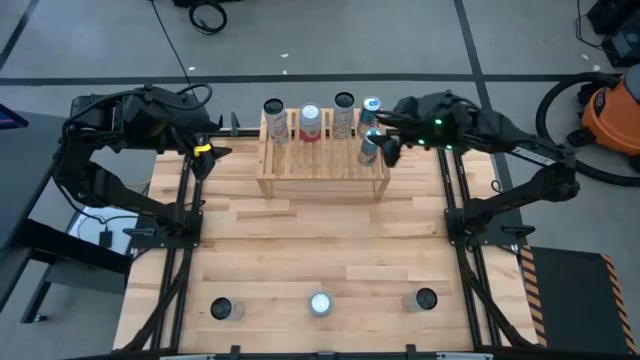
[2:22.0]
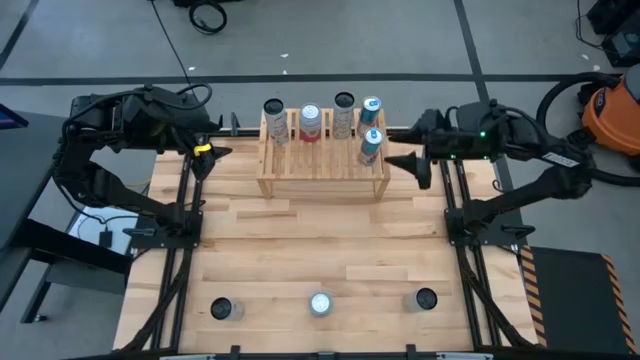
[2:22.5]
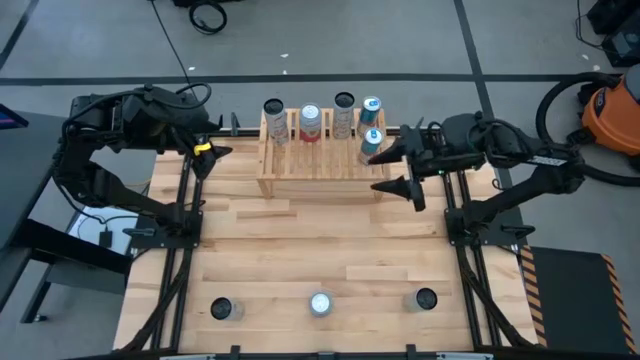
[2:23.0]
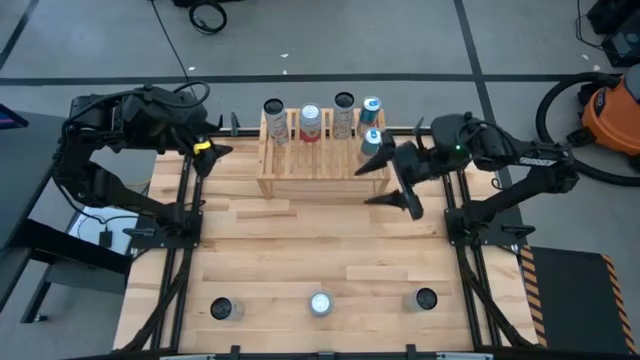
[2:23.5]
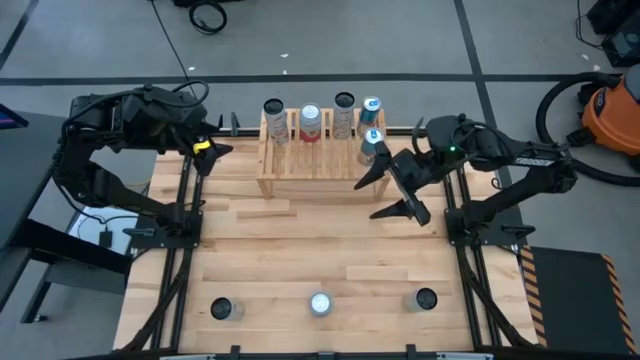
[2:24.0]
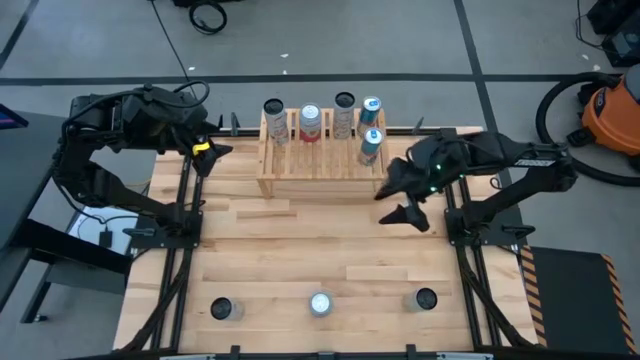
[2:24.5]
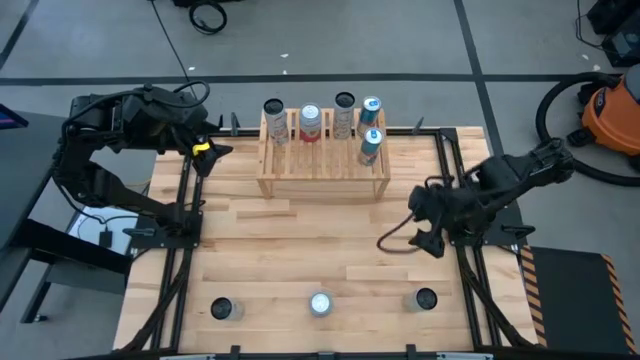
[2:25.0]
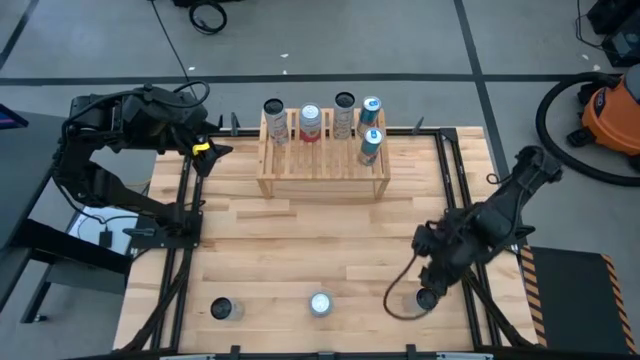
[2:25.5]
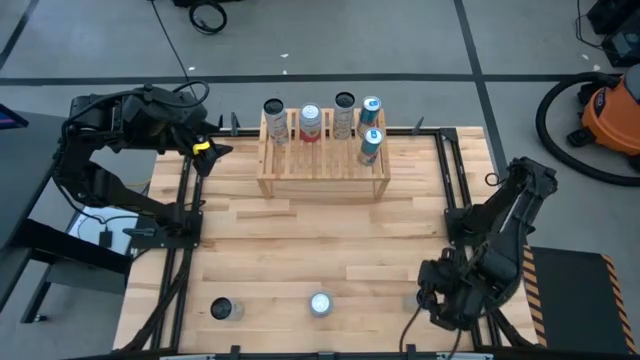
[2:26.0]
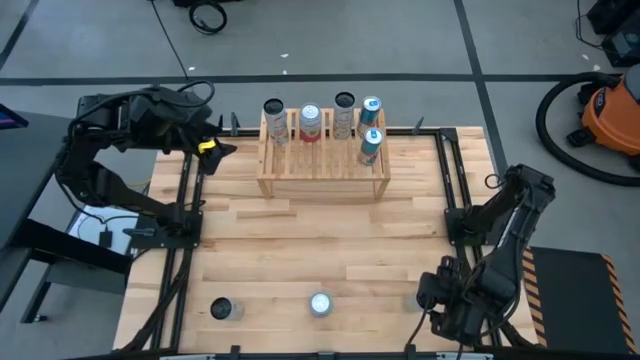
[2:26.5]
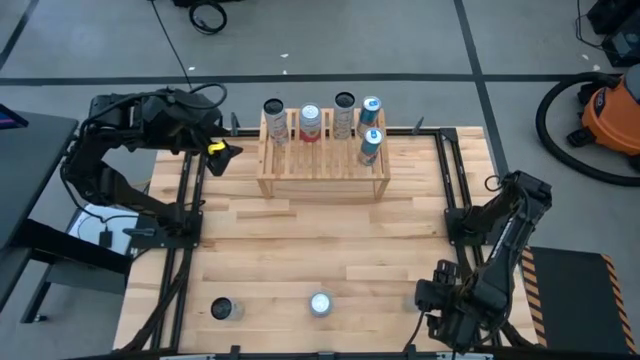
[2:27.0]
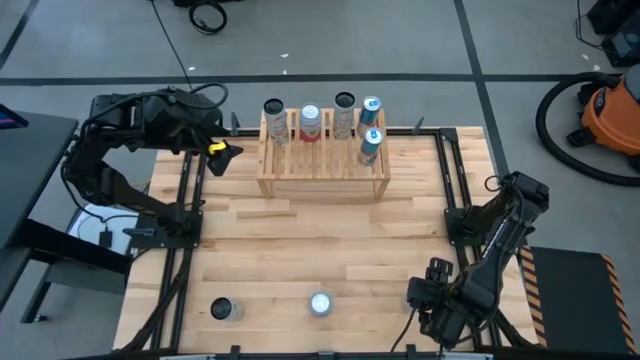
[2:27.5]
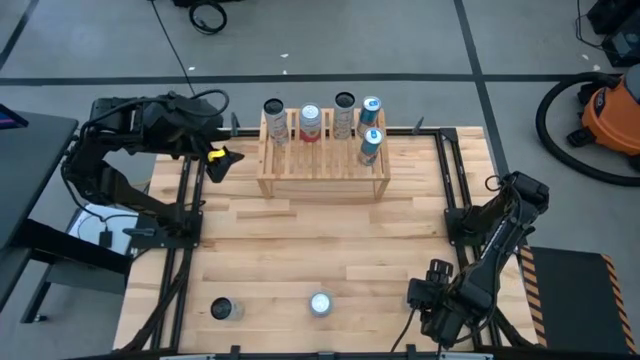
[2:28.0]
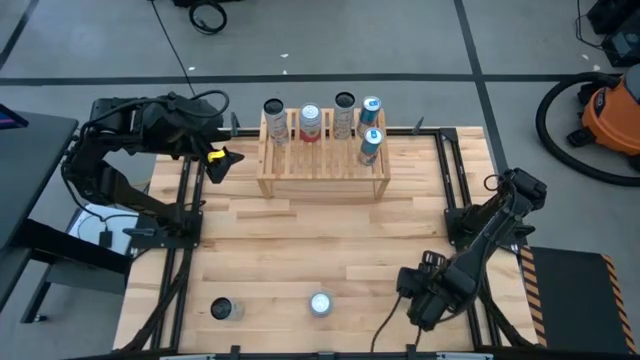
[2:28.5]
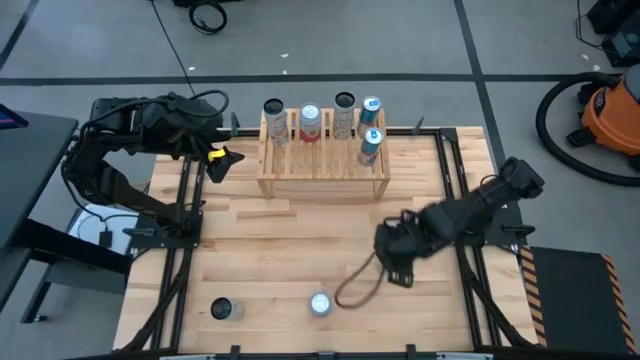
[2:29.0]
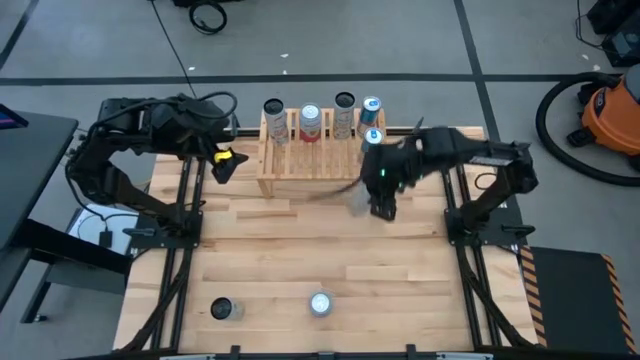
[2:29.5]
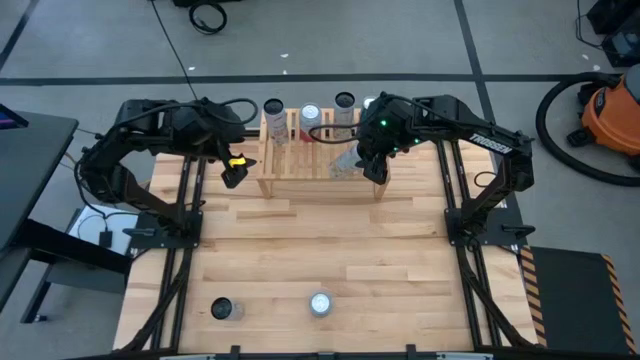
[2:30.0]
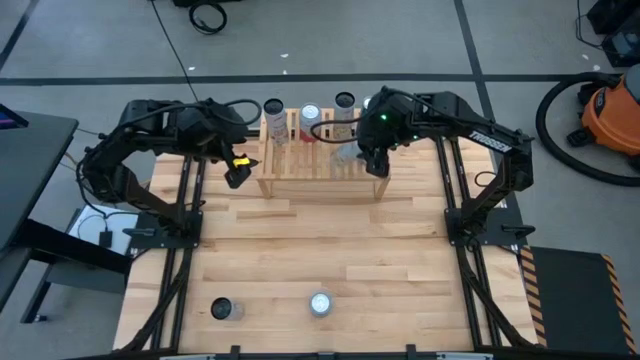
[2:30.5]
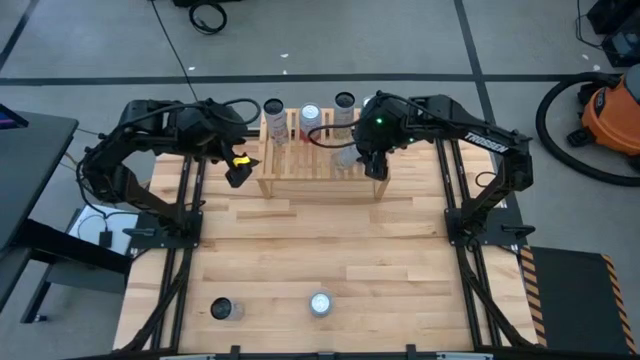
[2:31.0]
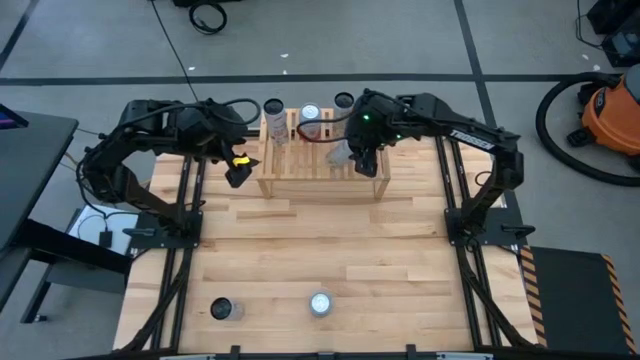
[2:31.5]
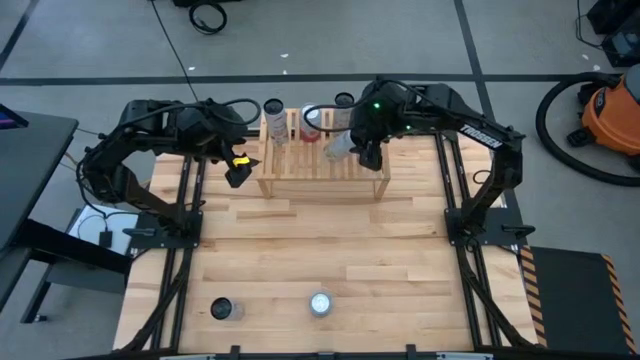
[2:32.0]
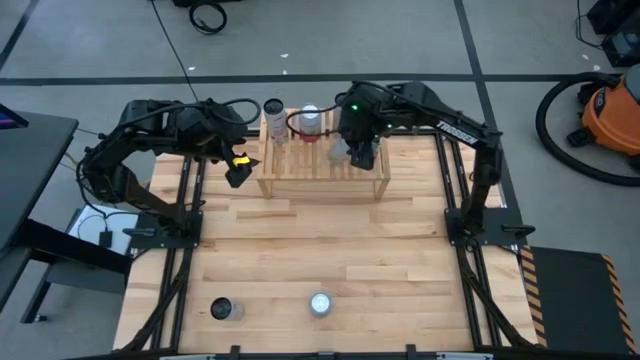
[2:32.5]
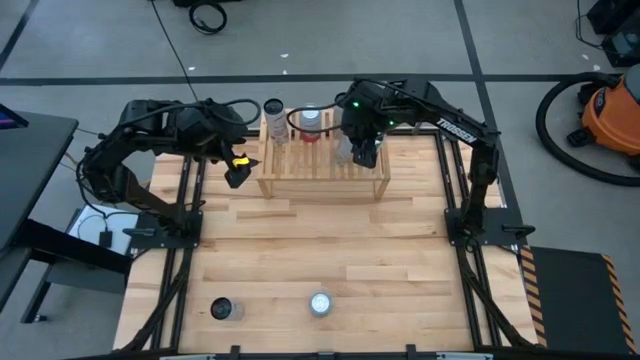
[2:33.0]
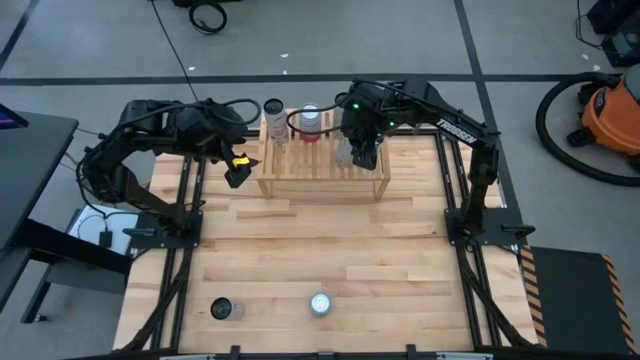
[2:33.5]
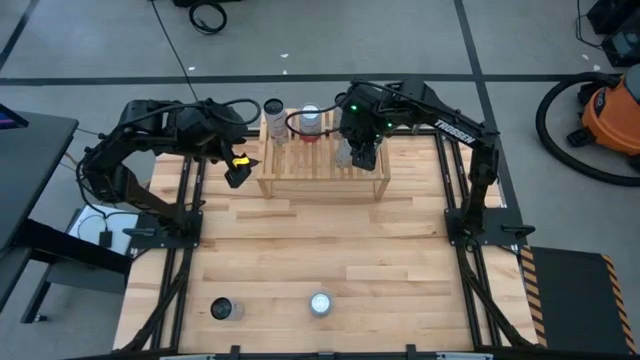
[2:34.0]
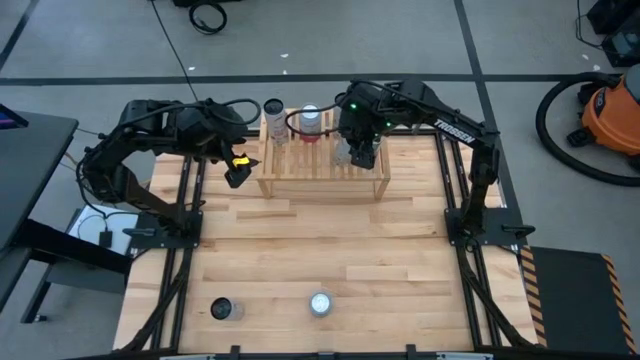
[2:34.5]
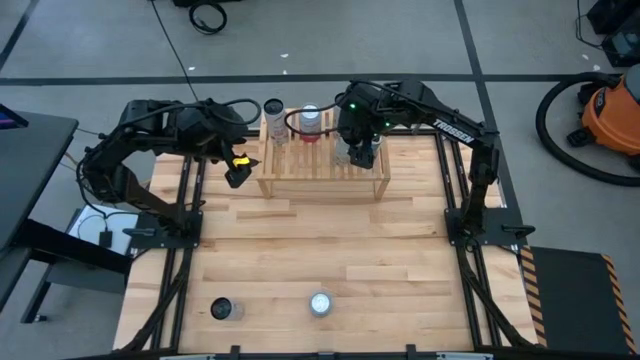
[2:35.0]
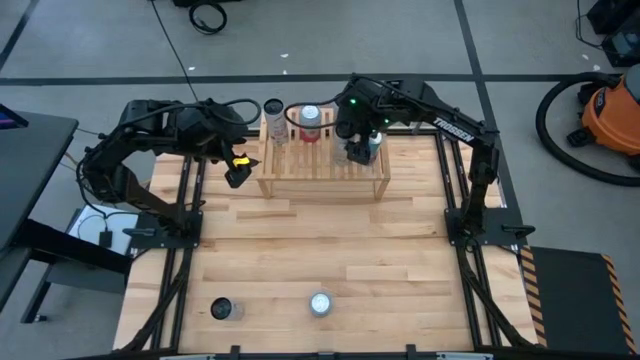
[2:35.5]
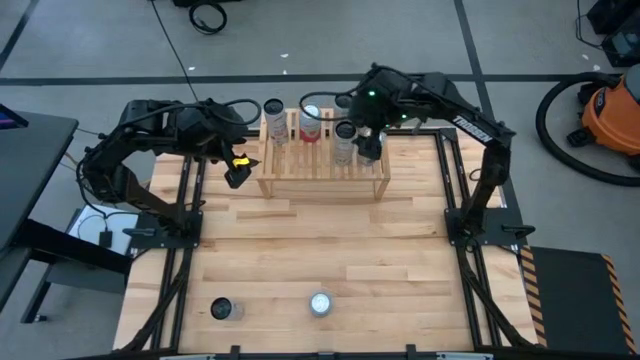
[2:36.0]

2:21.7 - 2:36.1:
Task: Place canned beverage on shelf
Put the white and yellow soda can on the shelf aligned with the other white and yellow soda can

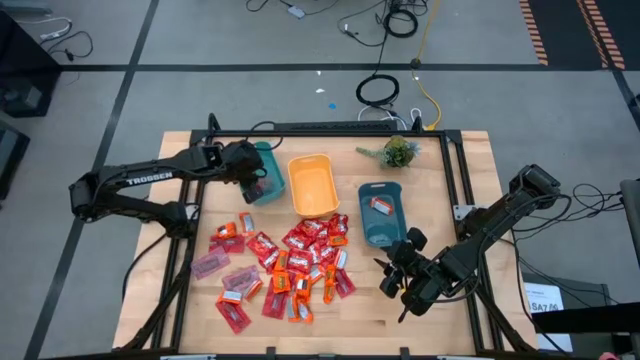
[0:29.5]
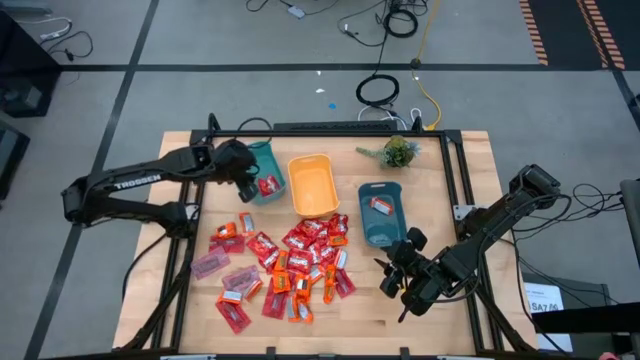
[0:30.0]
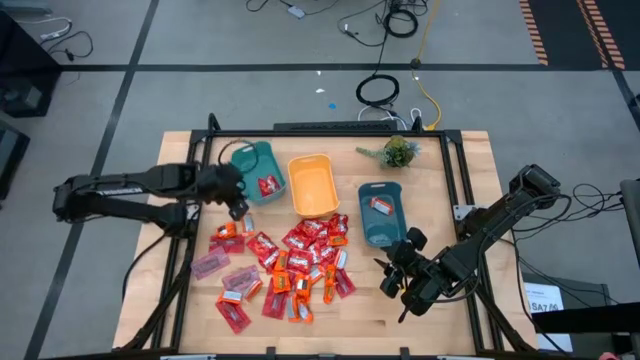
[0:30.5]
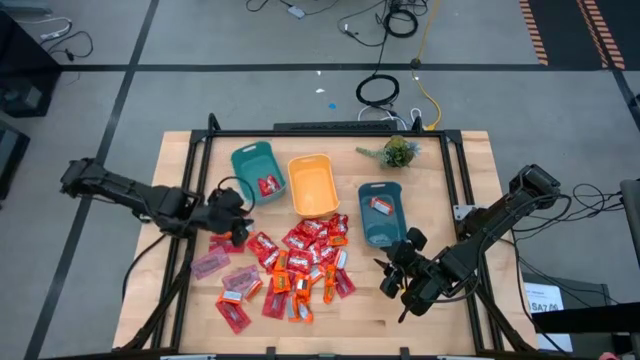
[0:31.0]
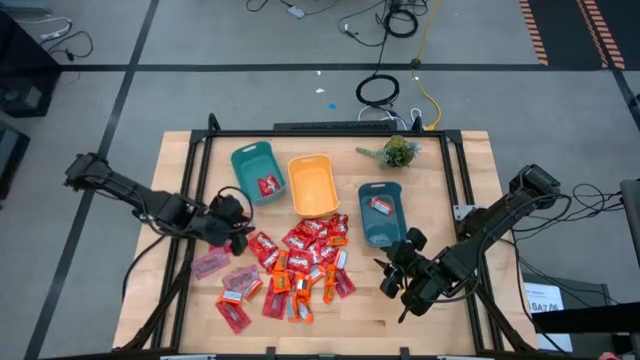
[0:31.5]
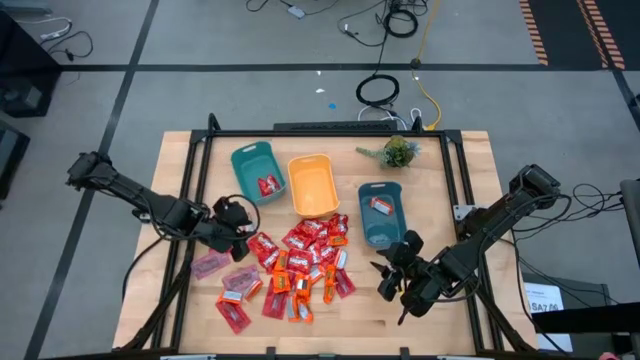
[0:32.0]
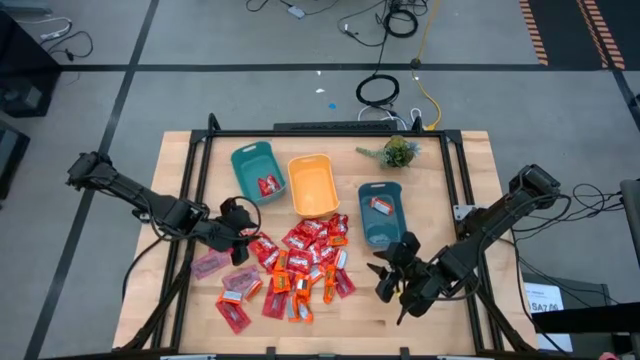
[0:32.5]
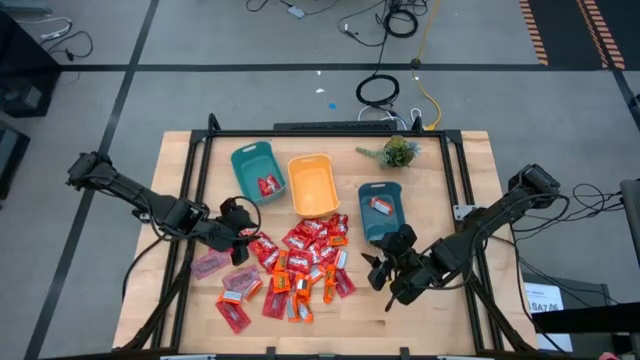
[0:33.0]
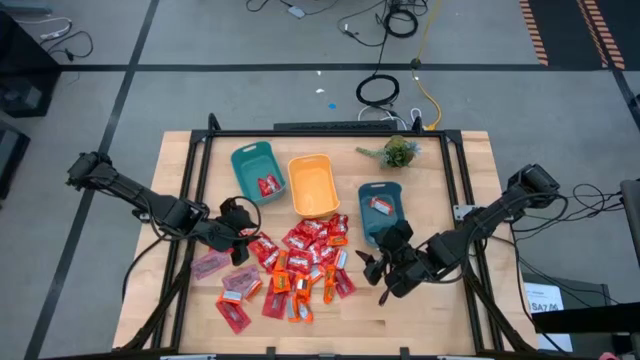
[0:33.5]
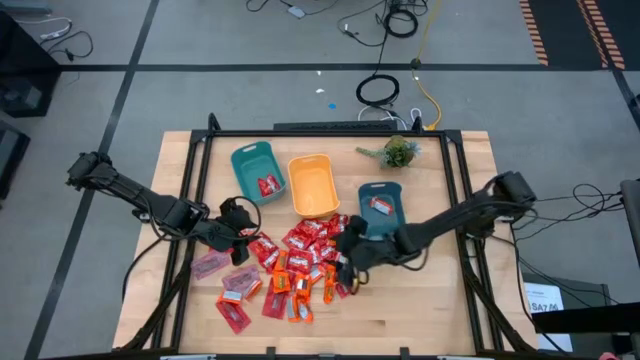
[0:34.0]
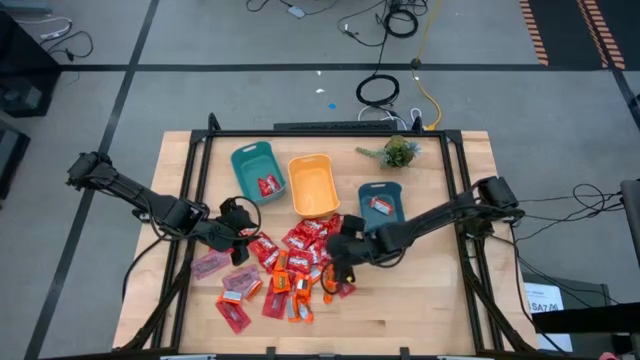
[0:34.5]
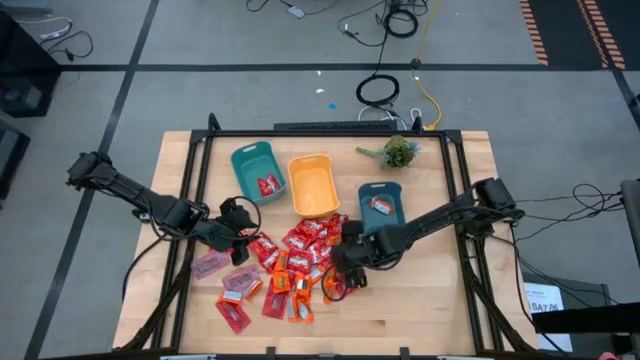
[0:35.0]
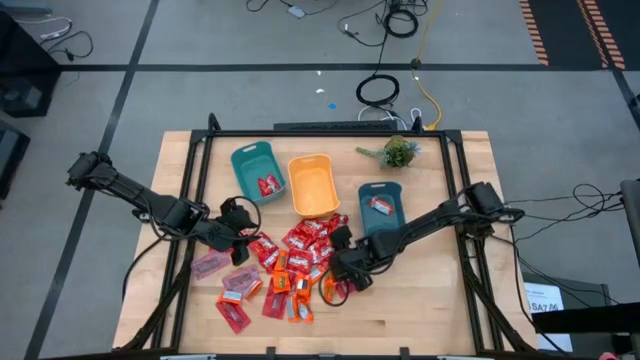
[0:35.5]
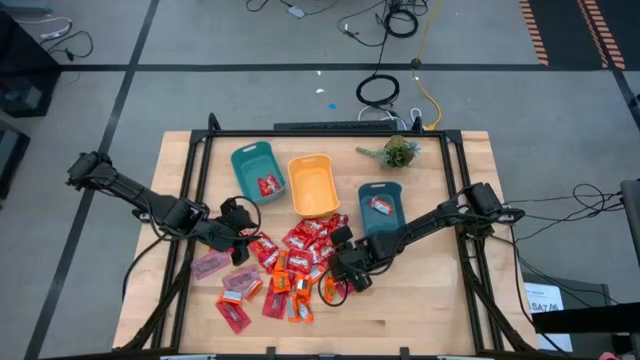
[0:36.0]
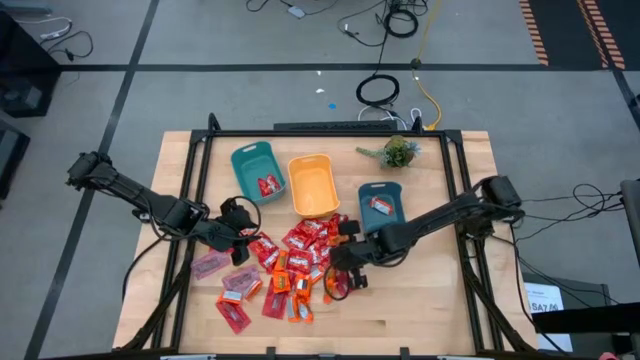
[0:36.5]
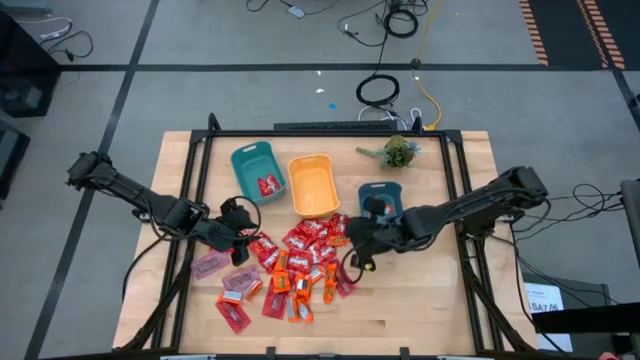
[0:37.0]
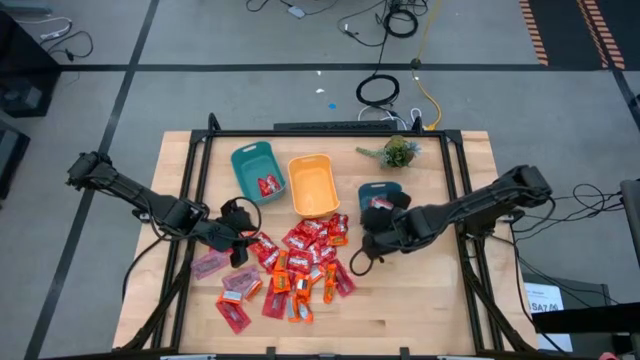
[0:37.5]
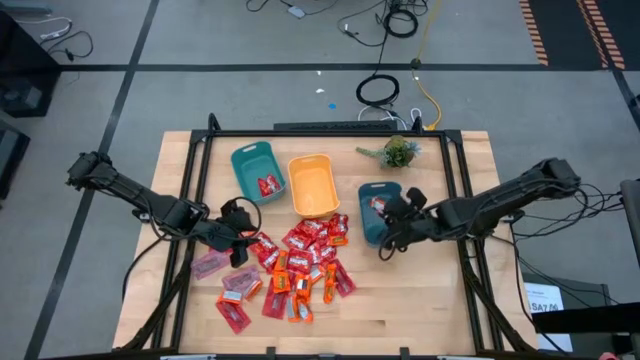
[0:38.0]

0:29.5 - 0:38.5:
Task: Sort candy
Put the orange wrapper chocolate into the dark blue bin
